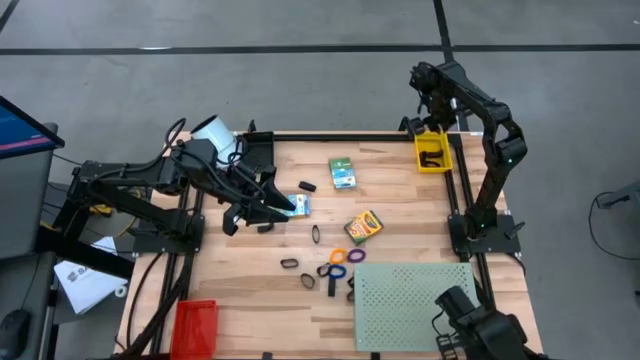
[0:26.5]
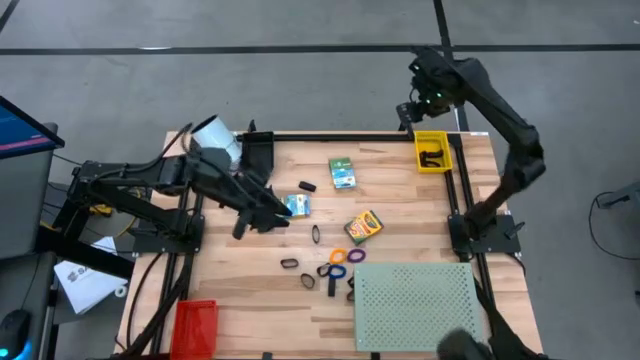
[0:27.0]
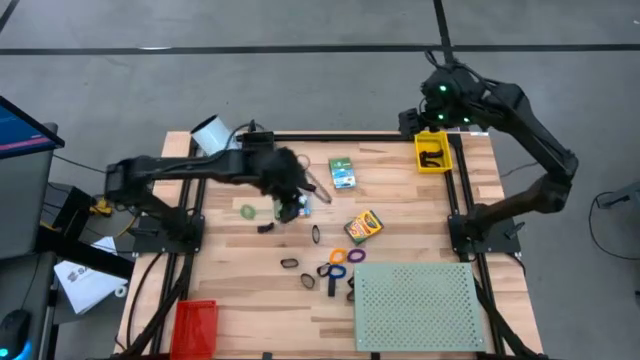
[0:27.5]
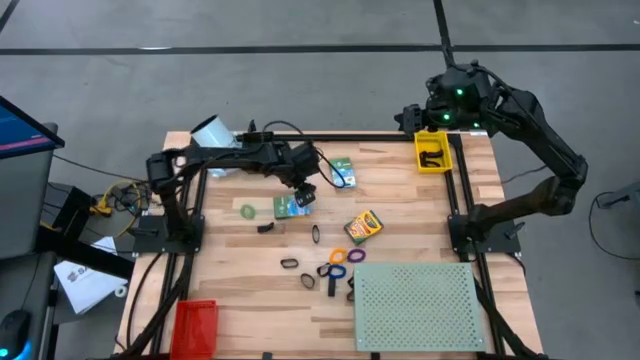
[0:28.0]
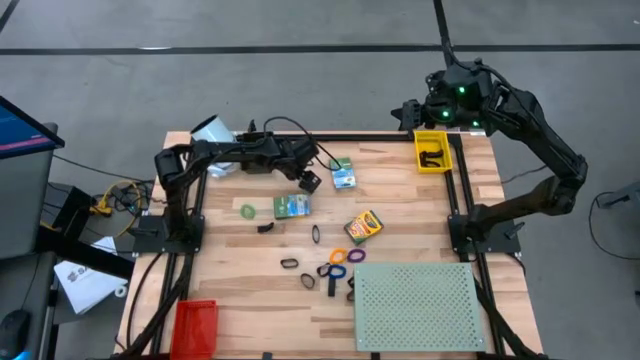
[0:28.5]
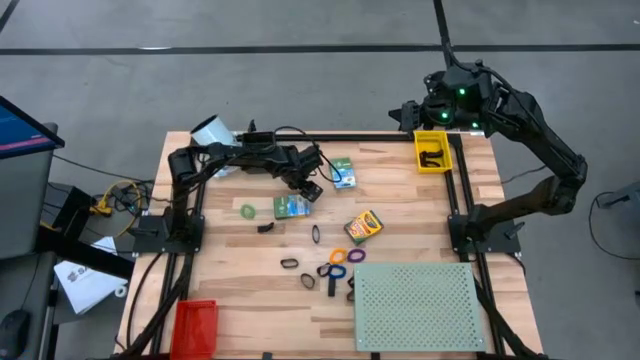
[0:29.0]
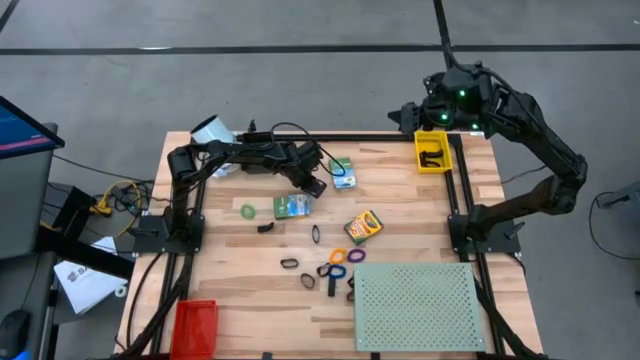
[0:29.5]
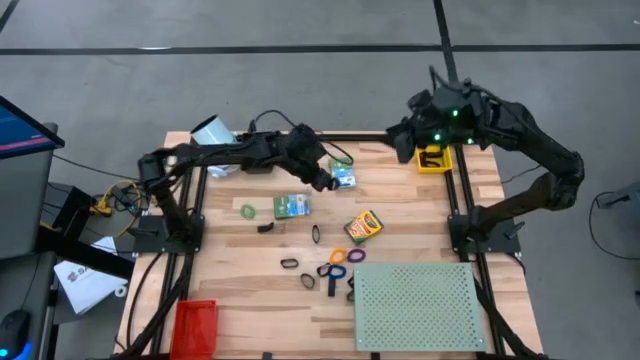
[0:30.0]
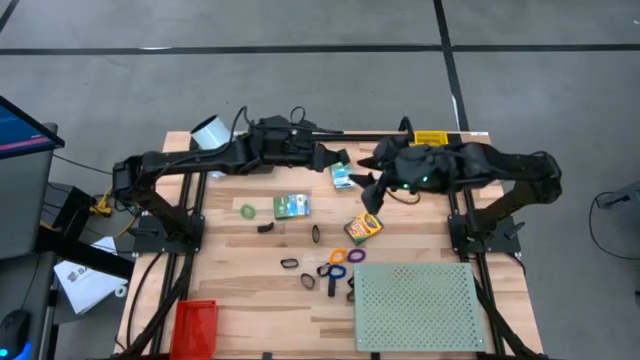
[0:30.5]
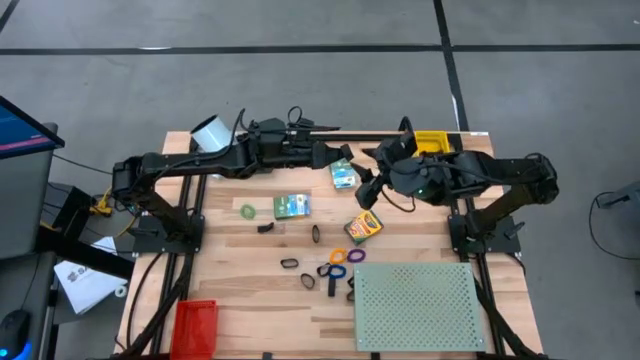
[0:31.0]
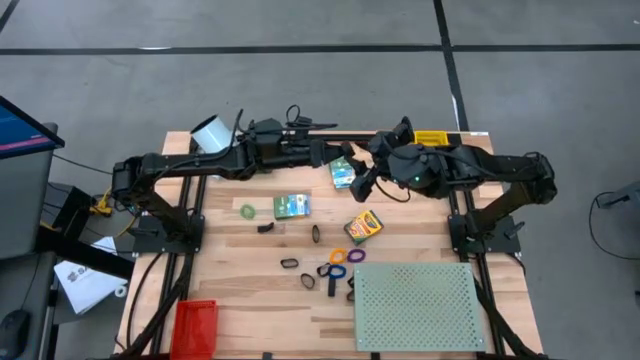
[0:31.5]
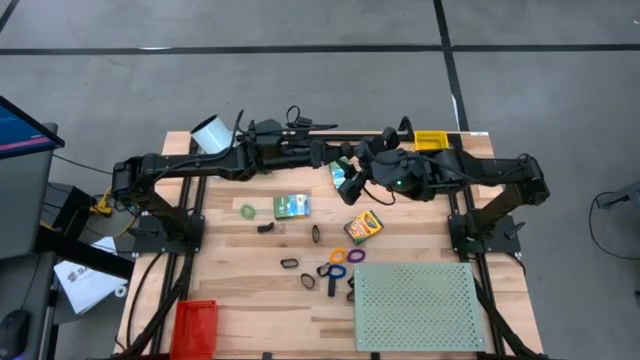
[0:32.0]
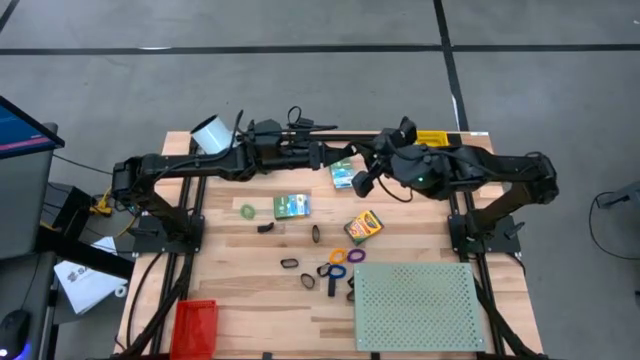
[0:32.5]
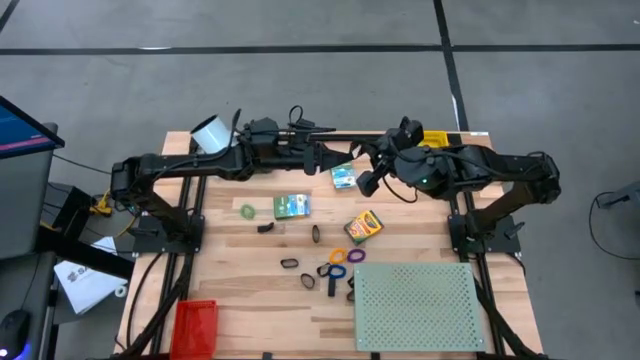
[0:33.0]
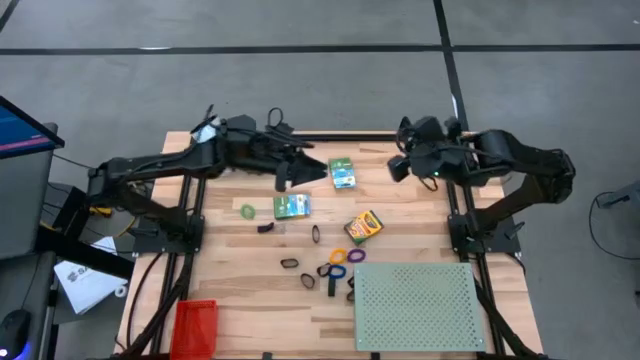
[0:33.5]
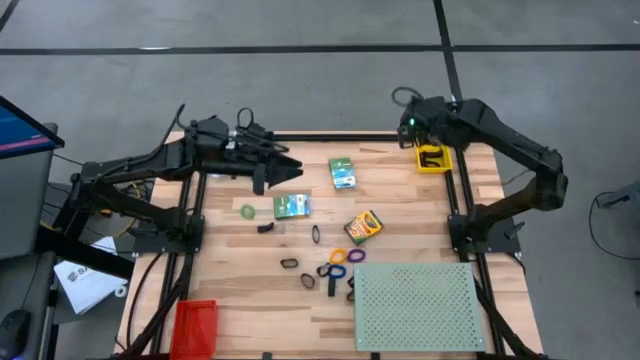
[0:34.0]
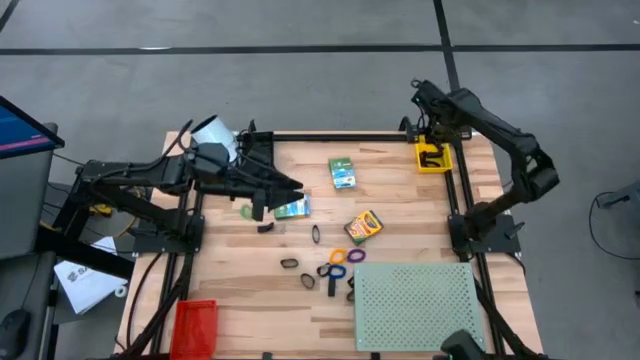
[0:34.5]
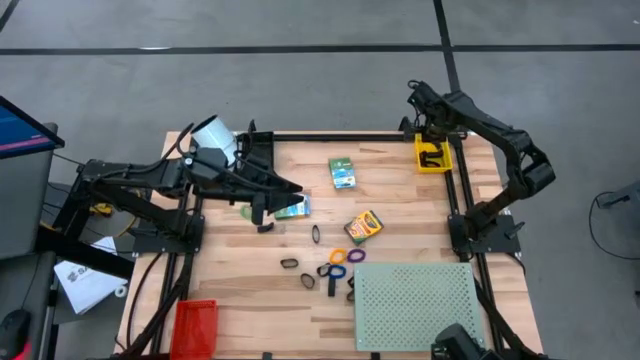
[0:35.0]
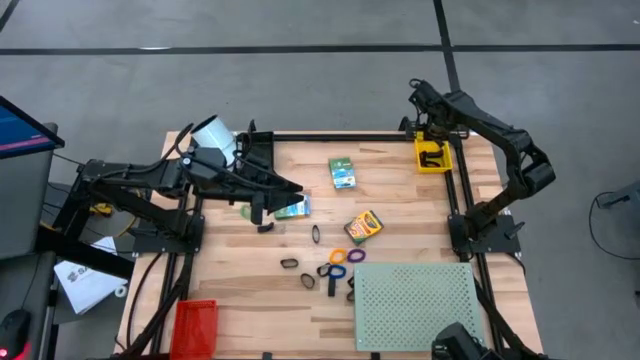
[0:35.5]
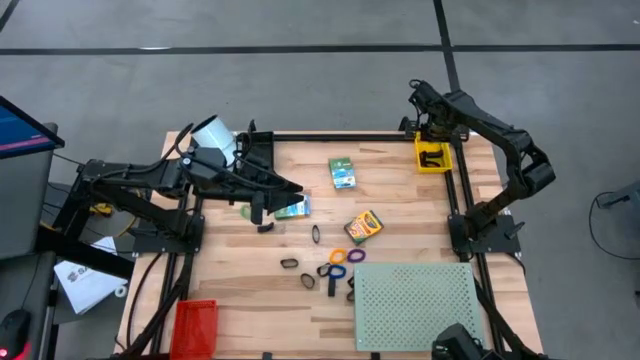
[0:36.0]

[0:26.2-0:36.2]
Task: Pick & Place Office Desk Supplies
Put the black rubber band into the yellow bin

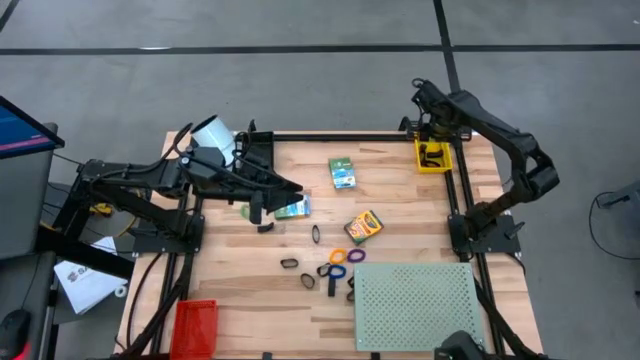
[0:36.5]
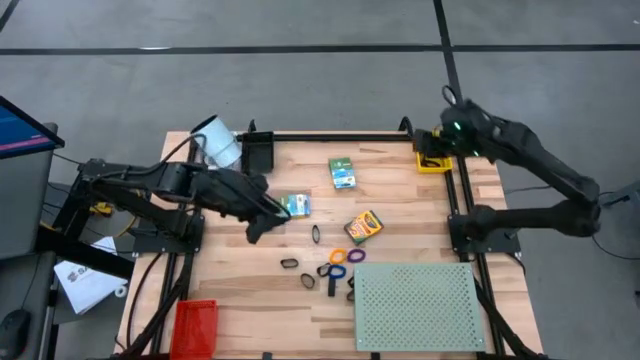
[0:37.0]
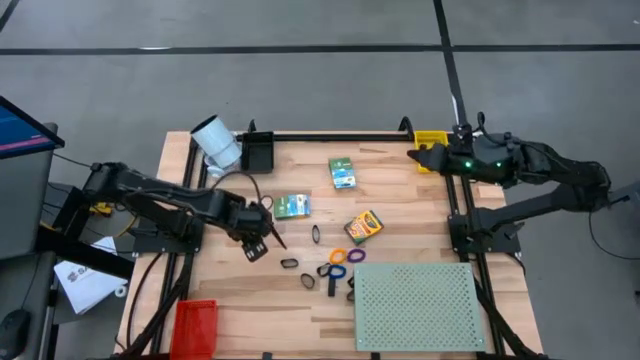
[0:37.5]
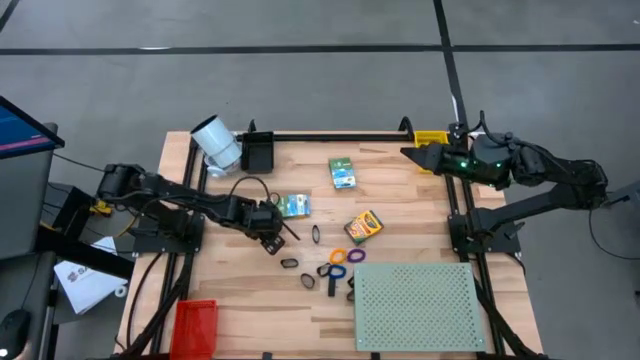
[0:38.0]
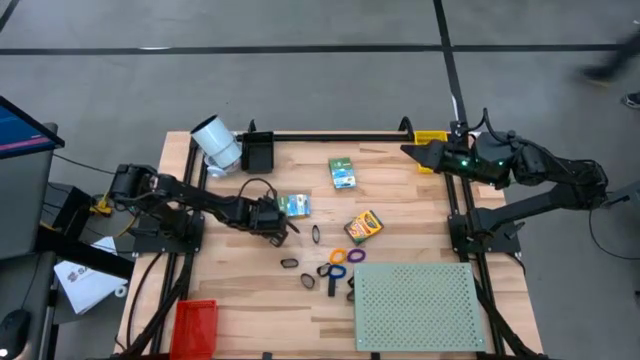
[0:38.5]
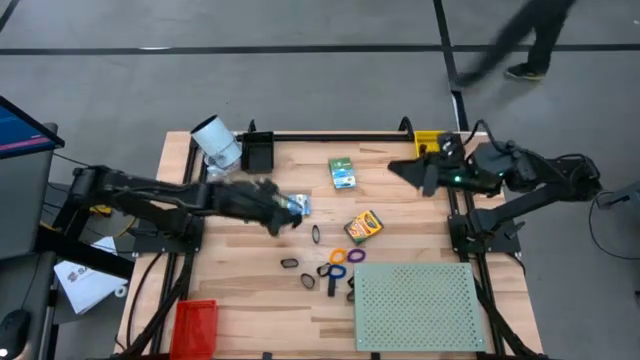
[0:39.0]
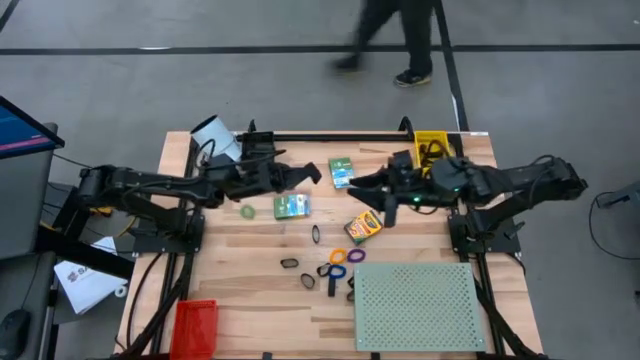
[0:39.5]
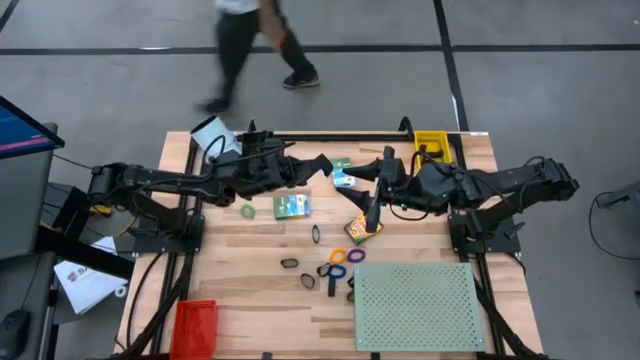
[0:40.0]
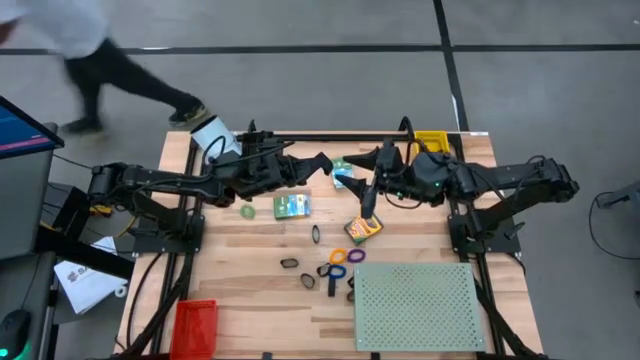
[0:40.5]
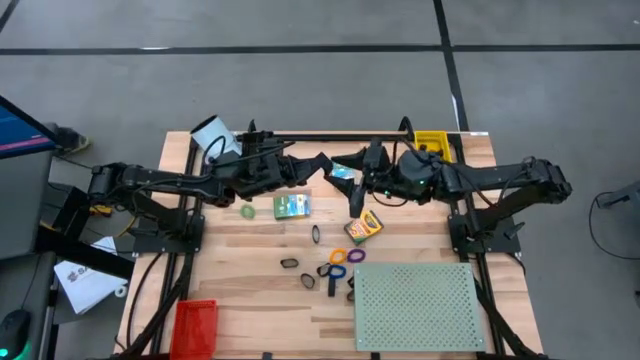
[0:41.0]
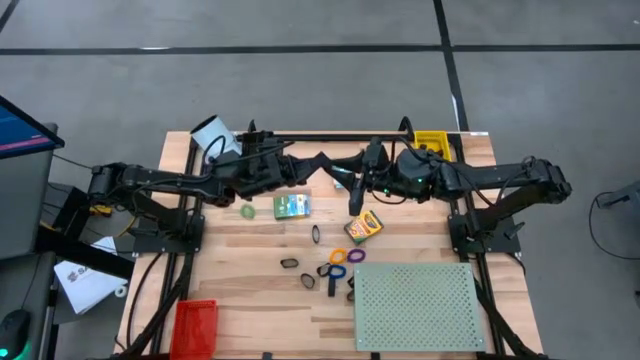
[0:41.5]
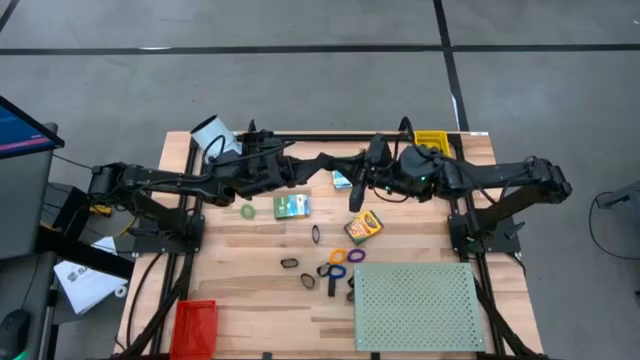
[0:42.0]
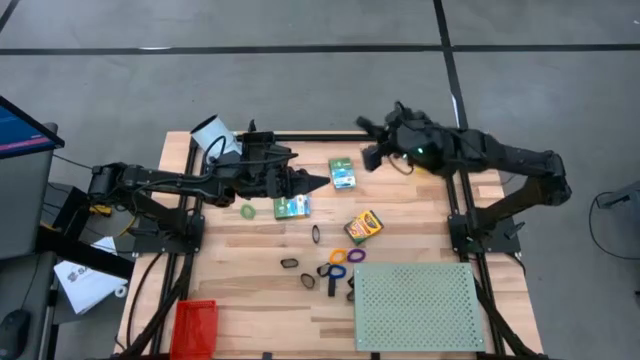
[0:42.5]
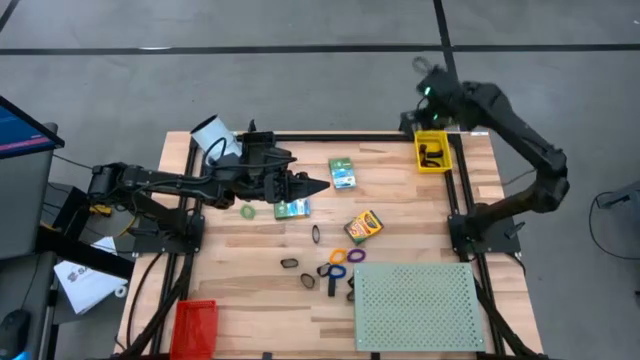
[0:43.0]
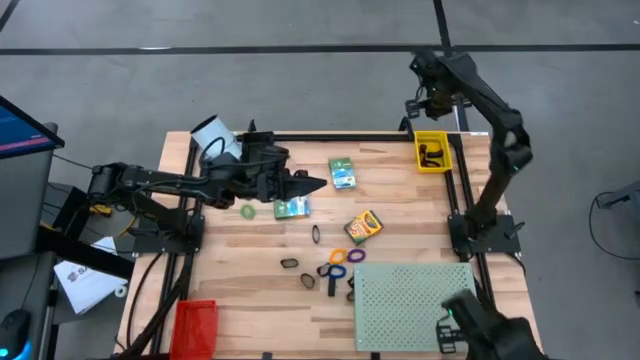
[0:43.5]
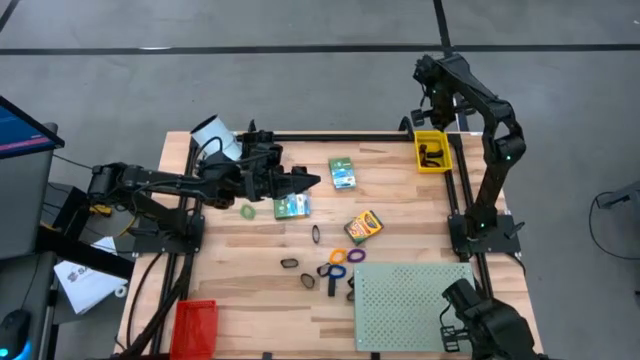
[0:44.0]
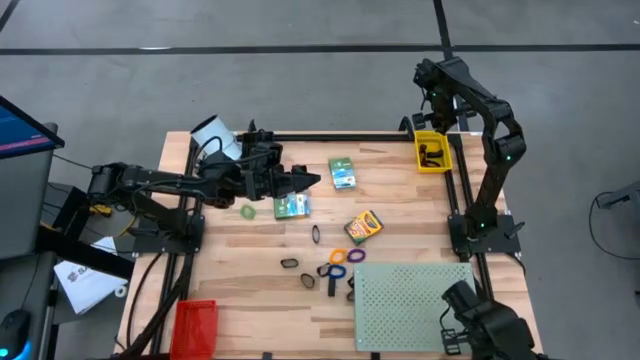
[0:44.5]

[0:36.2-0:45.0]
Put the black rubber band into the yellow bin

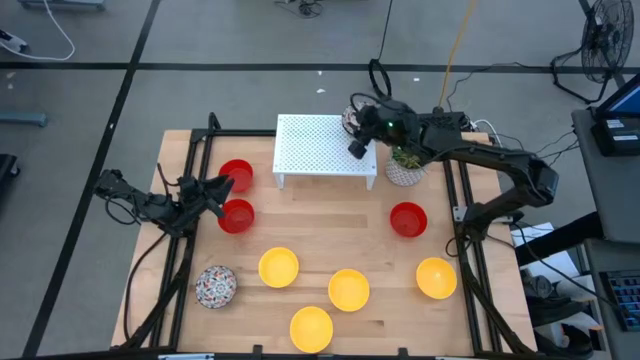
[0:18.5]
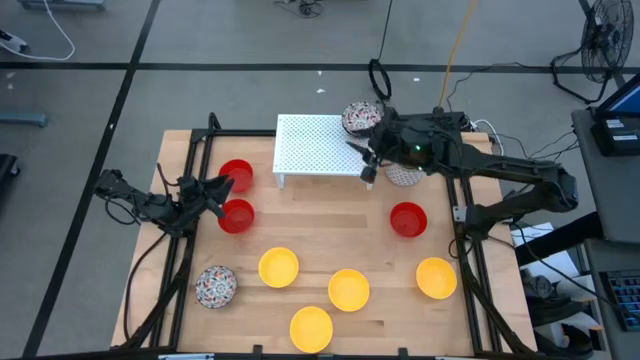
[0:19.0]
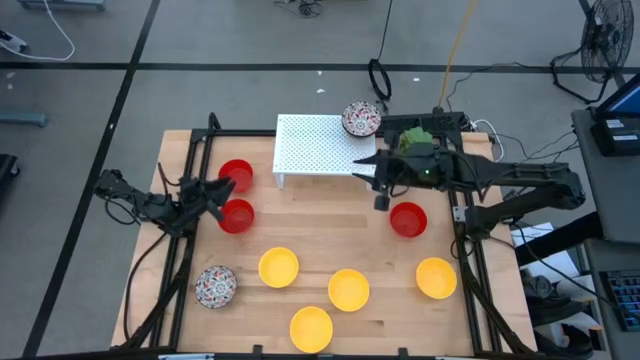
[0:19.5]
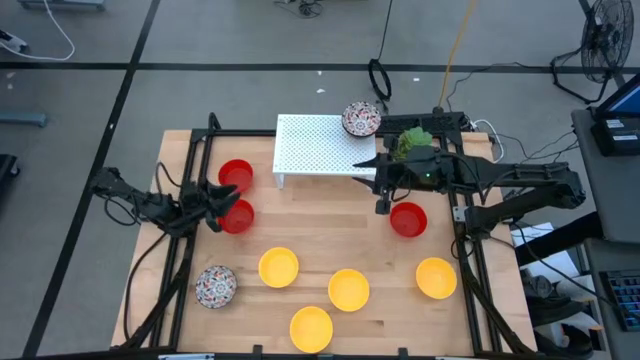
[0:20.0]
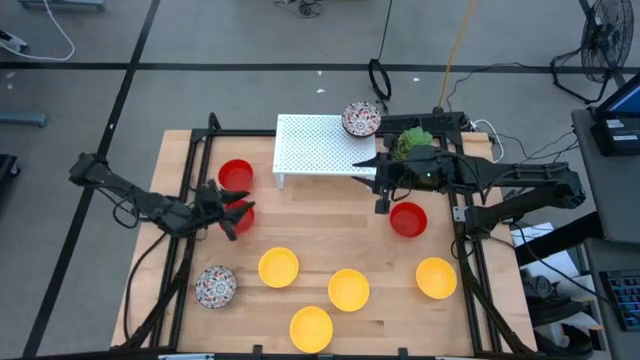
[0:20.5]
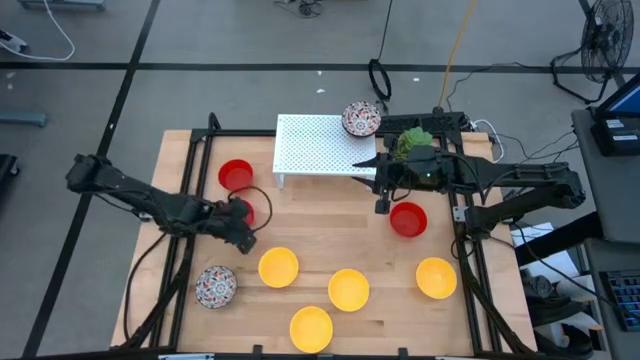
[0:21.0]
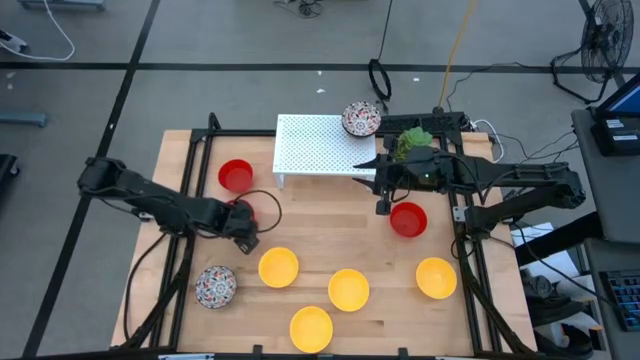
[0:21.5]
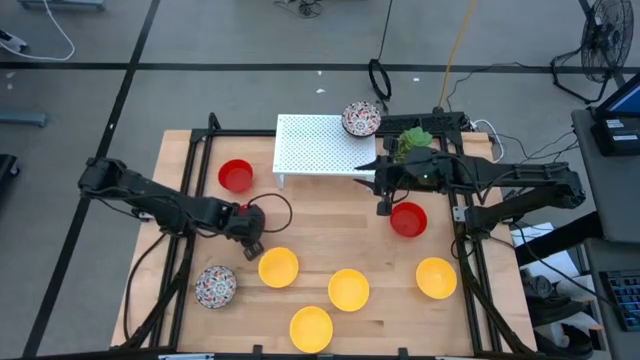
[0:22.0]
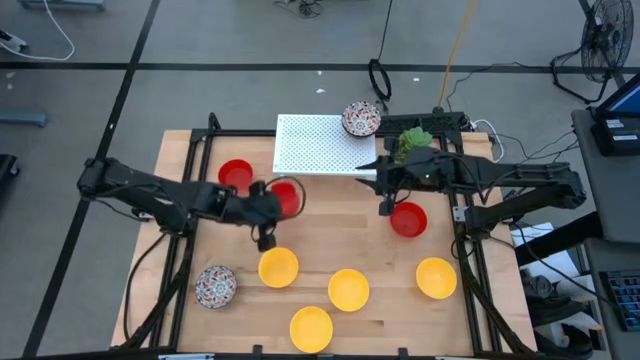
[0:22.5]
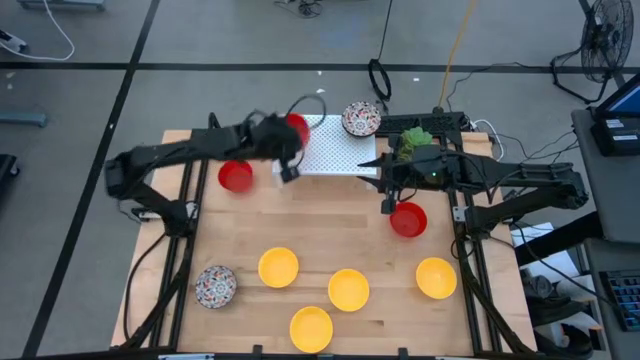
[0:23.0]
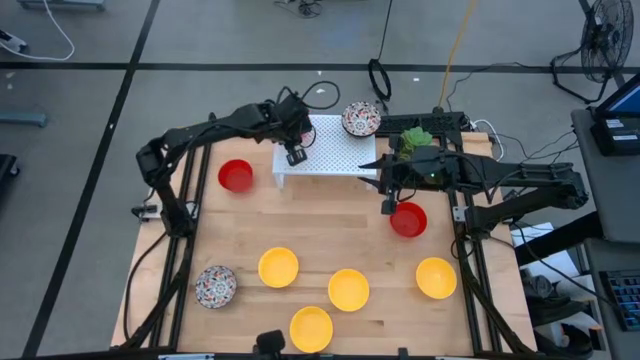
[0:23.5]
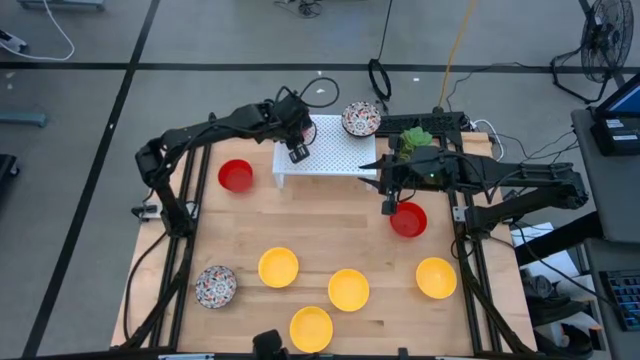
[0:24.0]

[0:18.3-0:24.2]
Task: Pick & Place Mini bowls
Put the red bowl on the shelf
